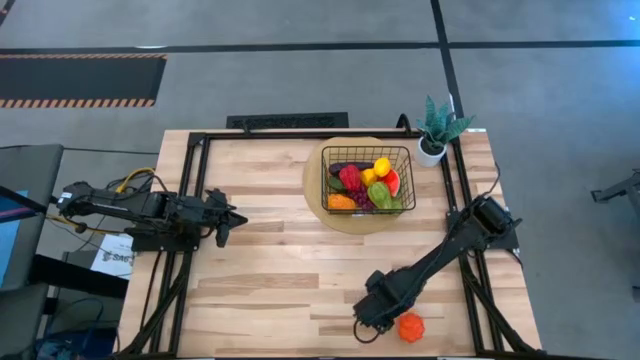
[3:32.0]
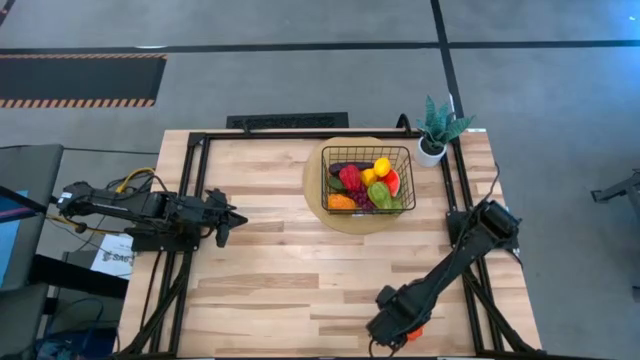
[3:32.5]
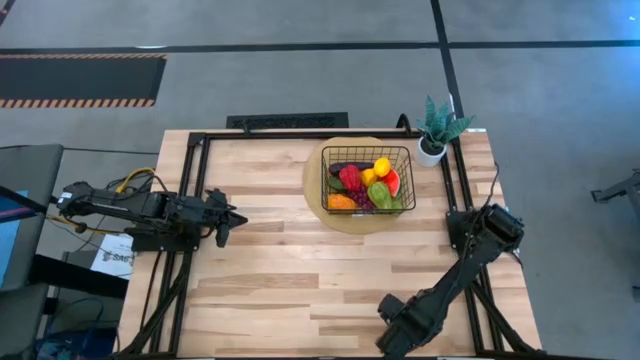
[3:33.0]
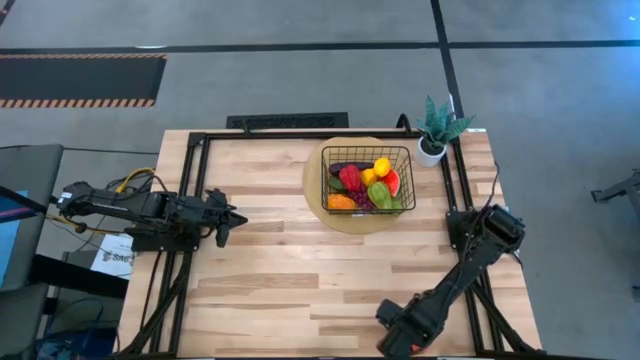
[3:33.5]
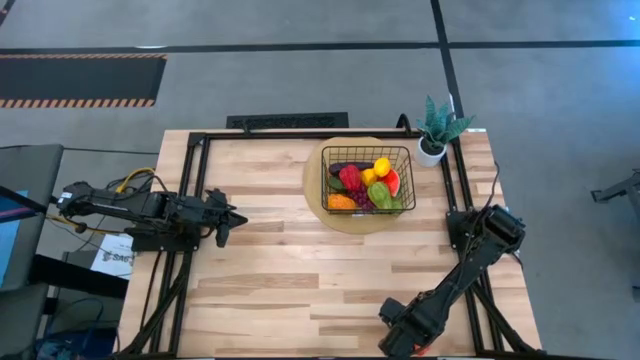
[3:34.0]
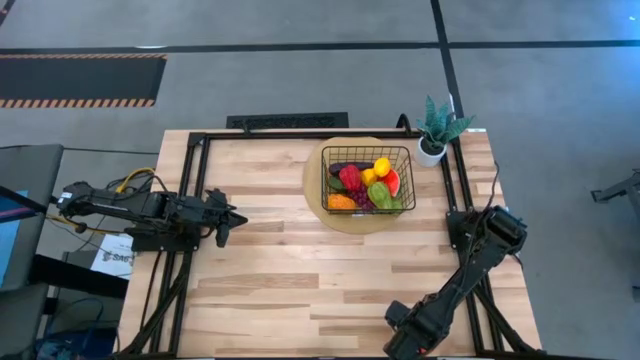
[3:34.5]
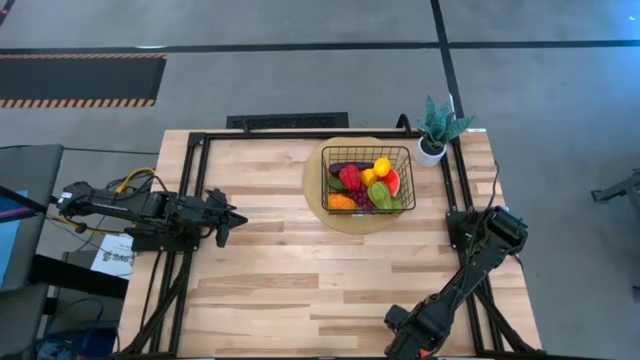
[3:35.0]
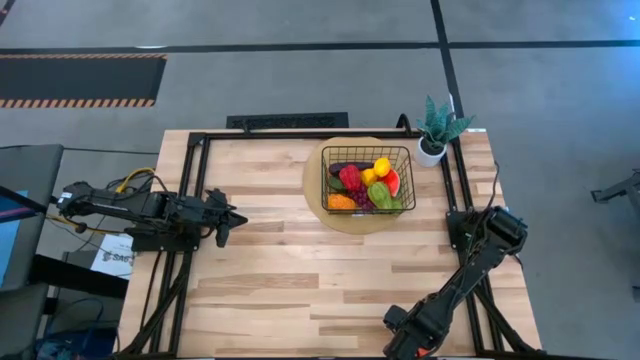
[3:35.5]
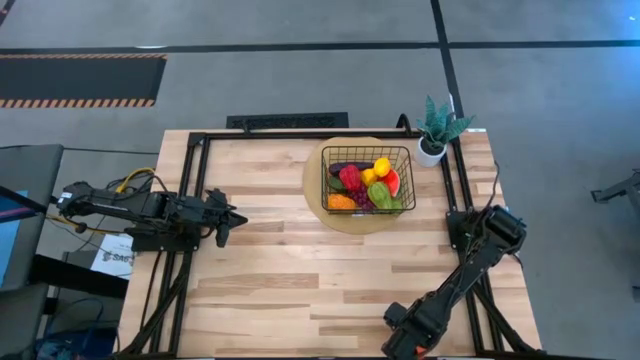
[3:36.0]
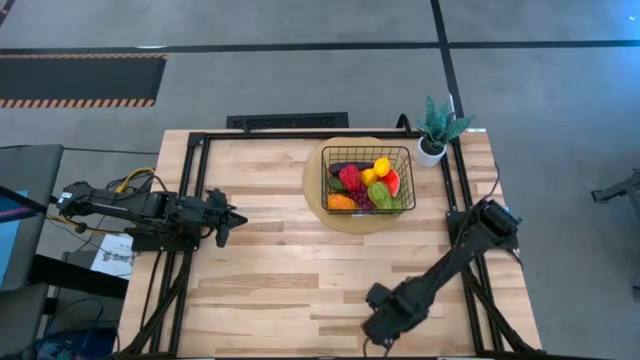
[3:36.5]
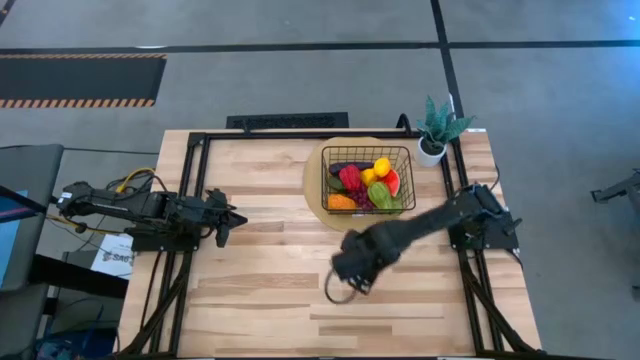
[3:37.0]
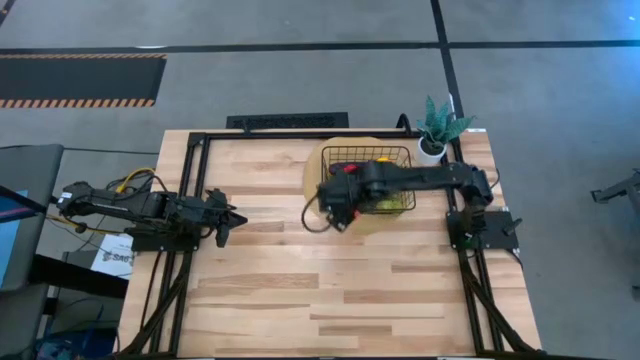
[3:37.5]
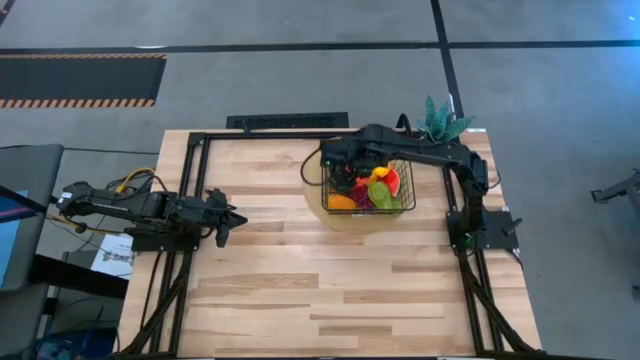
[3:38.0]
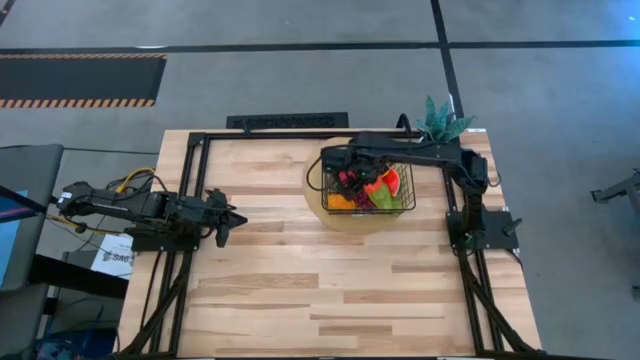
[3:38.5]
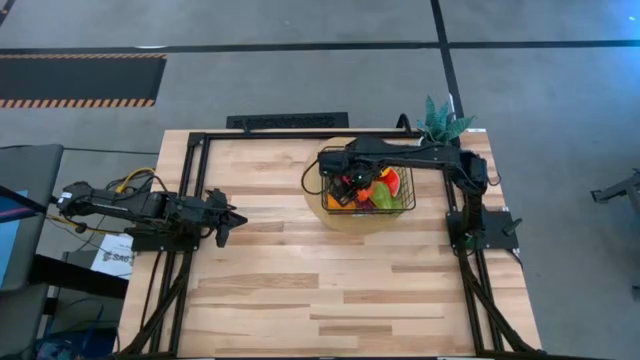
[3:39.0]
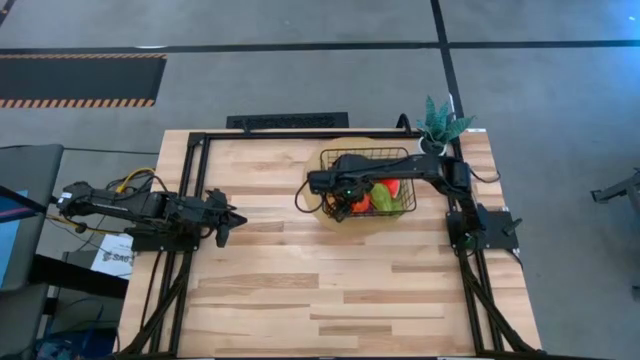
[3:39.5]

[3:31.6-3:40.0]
Task: Build produce basket
Put the orange pumpkin into the wire basket

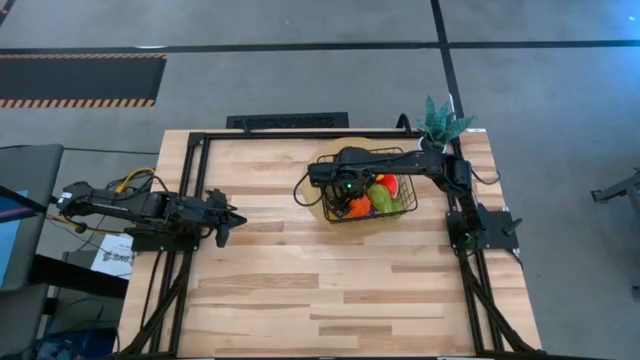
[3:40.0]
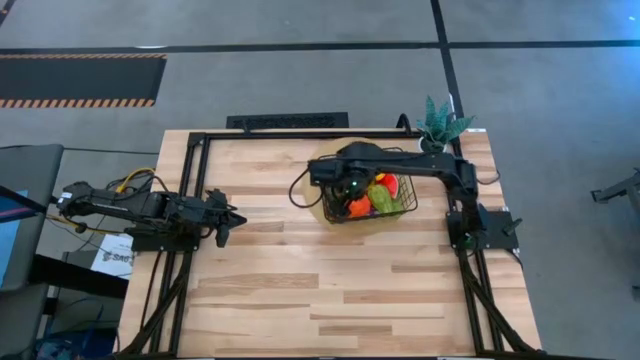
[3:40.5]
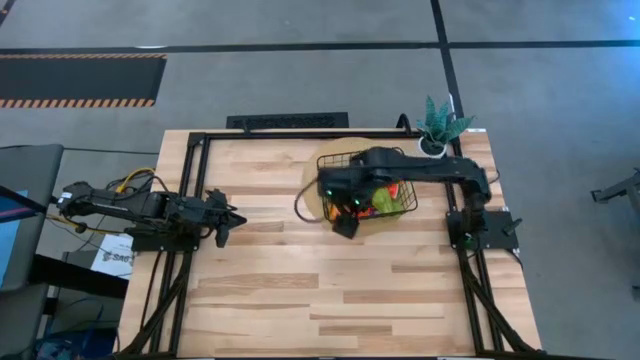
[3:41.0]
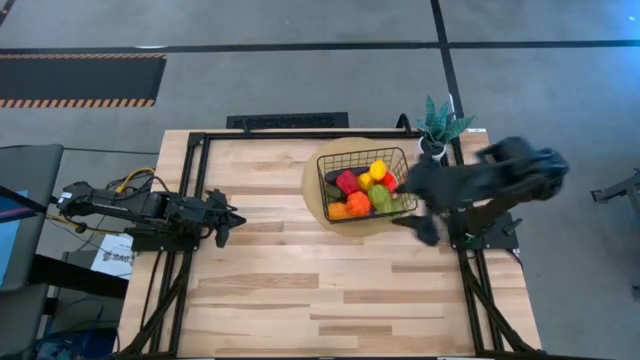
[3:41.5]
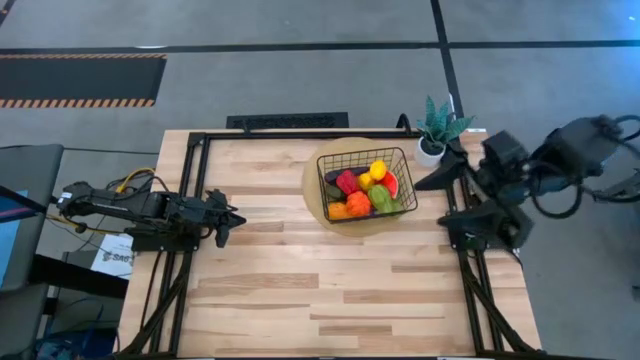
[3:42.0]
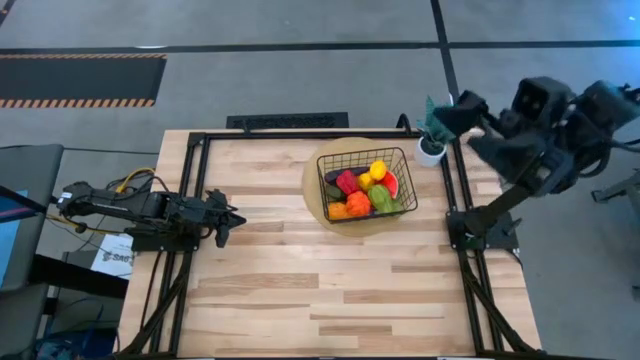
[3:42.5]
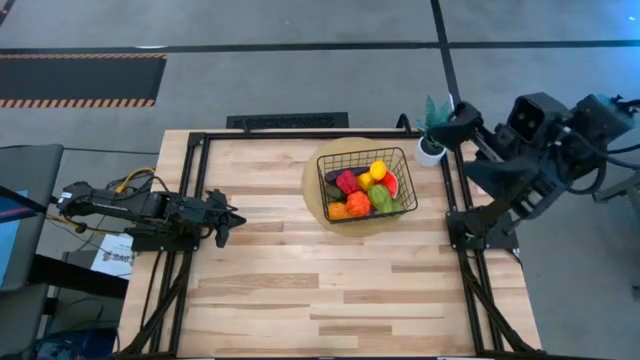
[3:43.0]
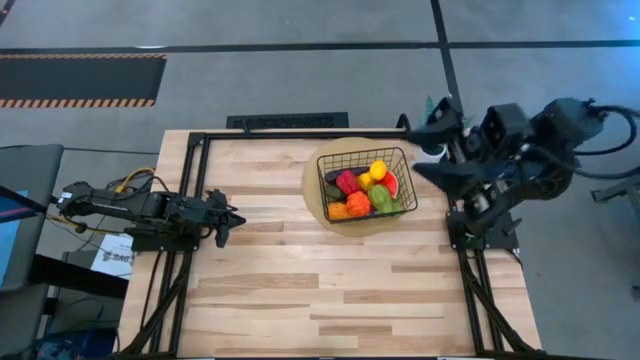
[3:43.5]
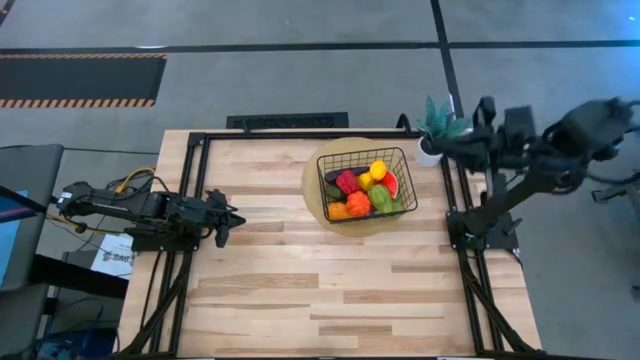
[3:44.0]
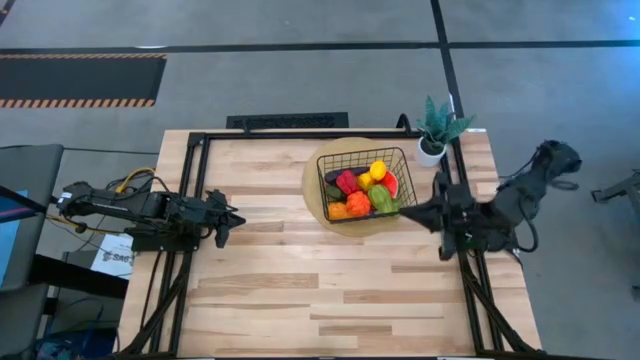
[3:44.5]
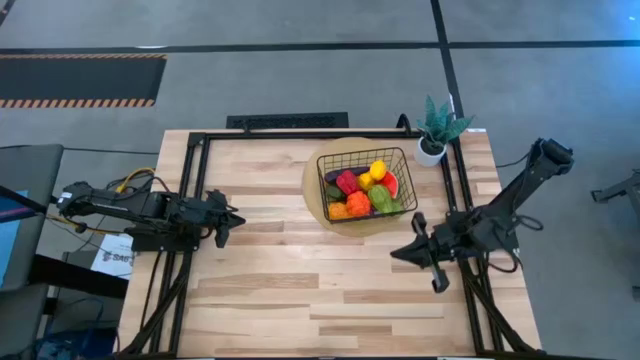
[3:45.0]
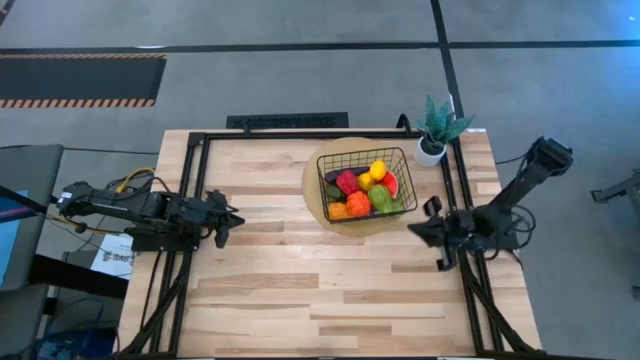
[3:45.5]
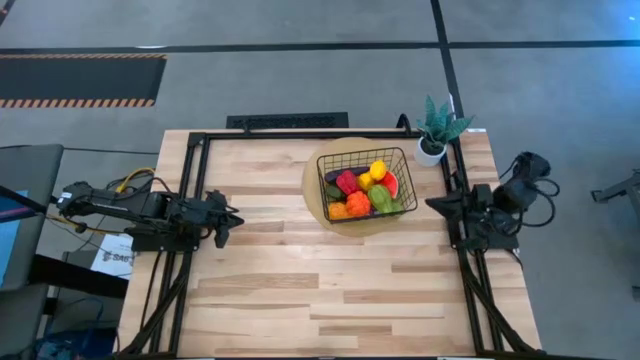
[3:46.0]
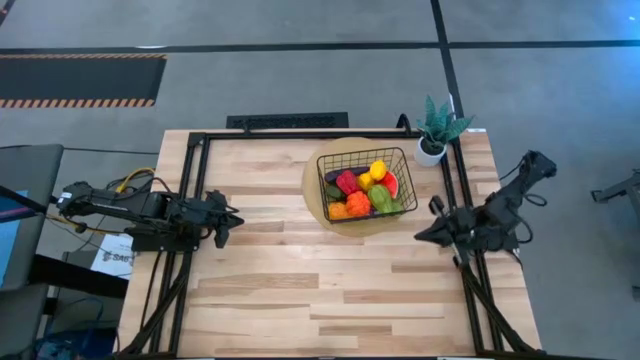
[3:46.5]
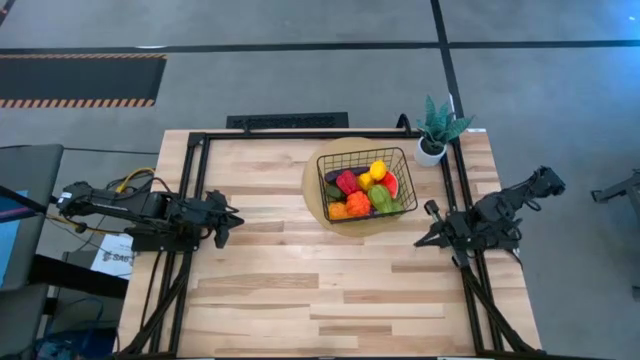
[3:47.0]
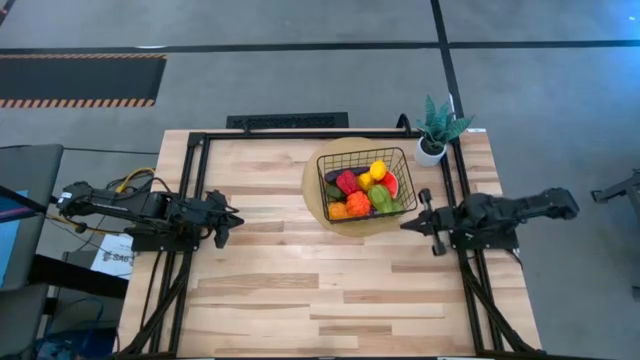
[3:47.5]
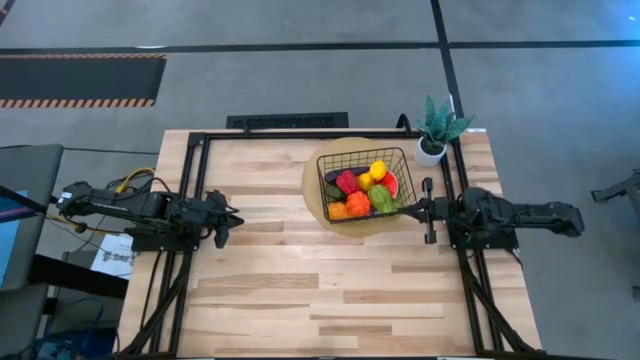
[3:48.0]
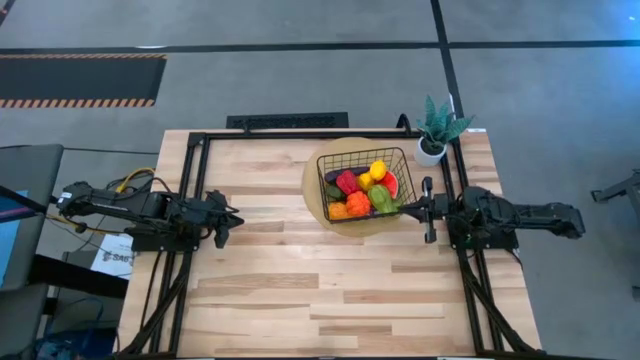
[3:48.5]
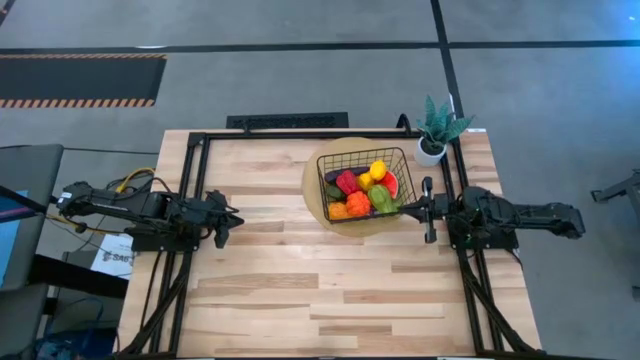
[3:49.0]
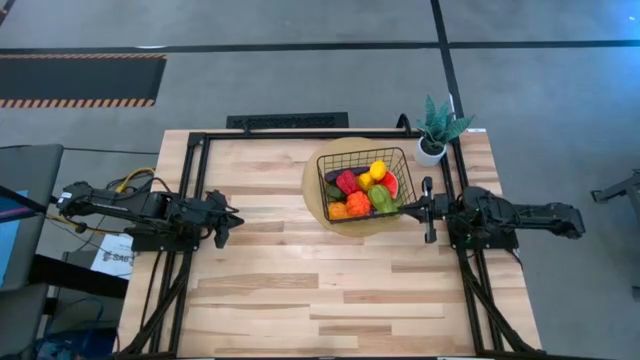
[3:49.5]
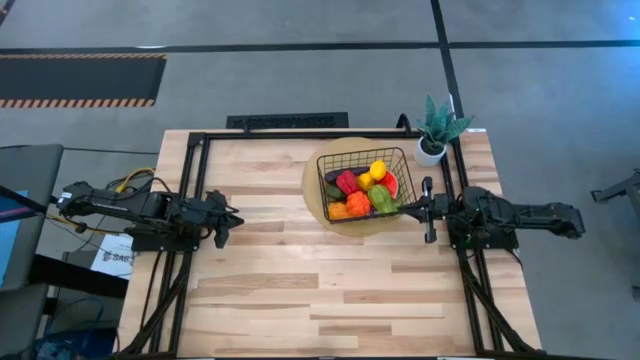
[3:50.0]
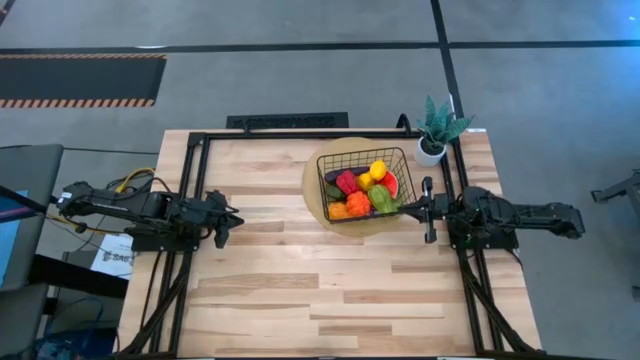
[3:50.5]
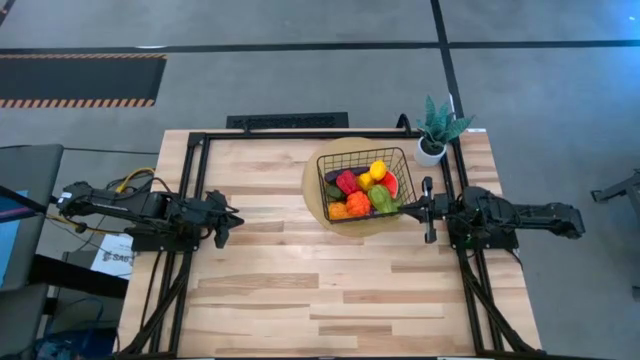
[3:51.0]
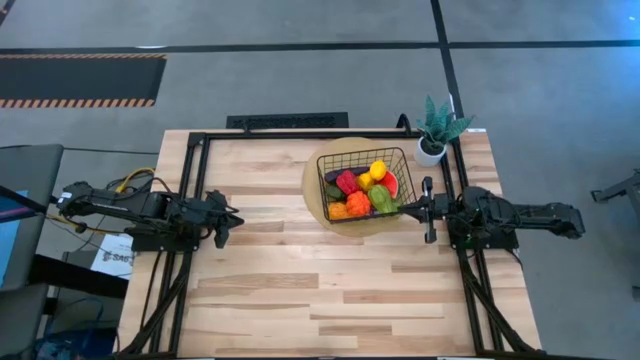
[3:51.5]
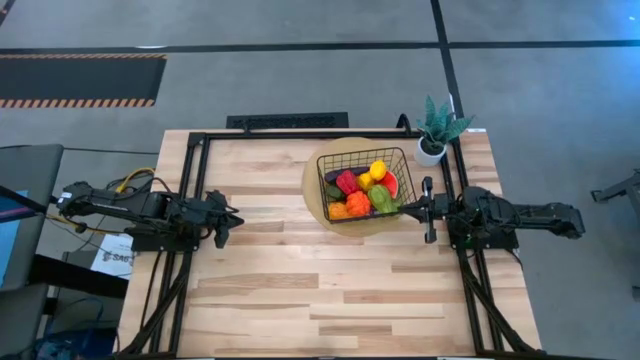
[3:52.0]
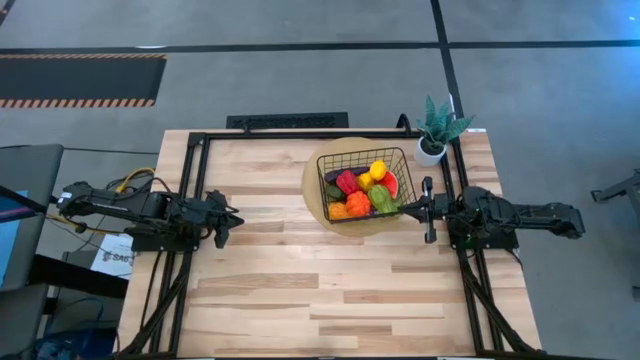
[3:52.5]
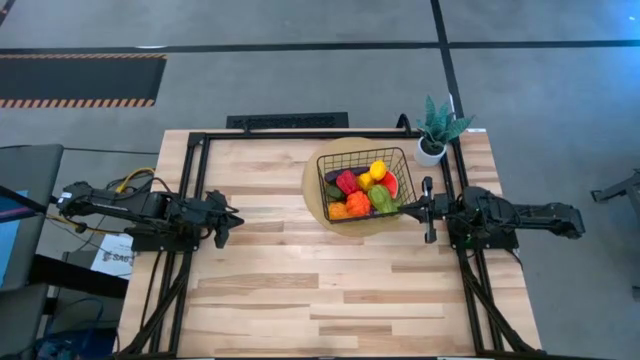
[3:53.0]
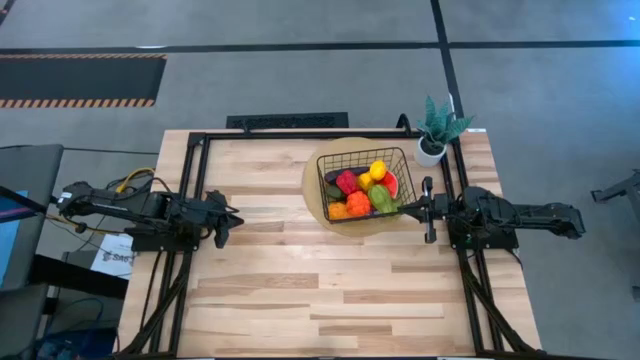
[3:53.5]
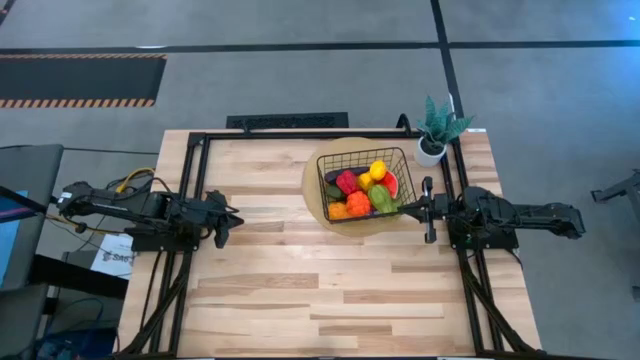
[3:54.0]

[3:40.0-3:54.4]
Return to Home Position
